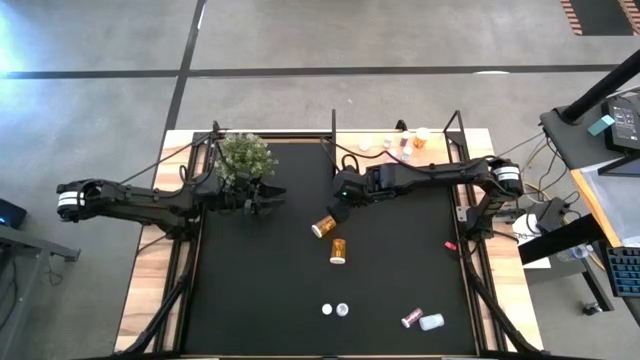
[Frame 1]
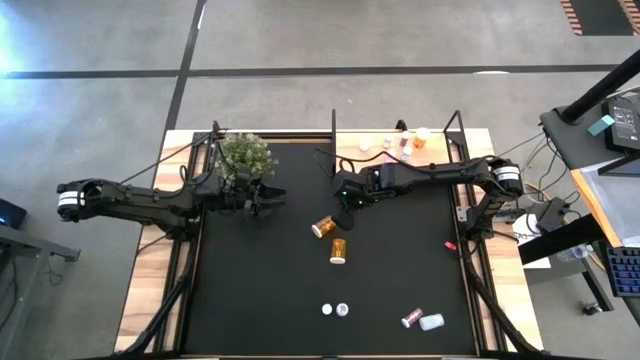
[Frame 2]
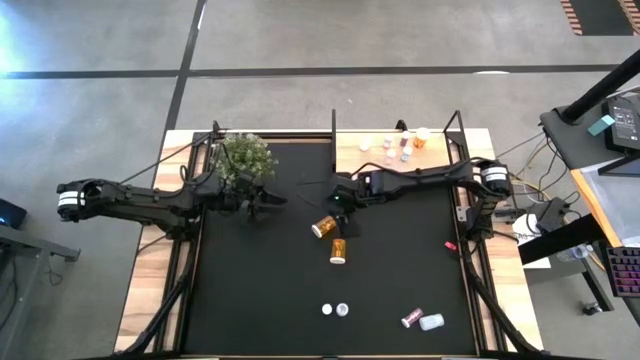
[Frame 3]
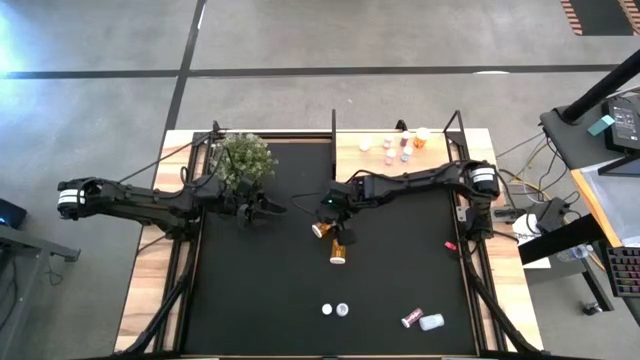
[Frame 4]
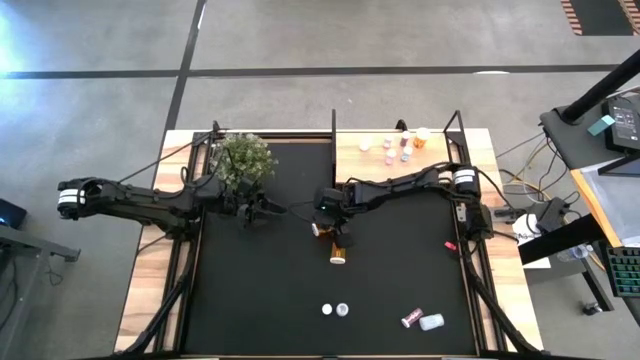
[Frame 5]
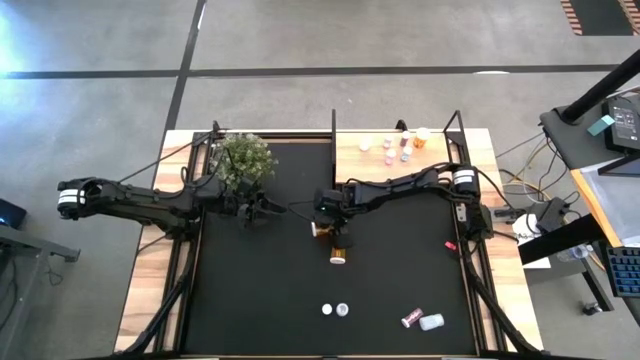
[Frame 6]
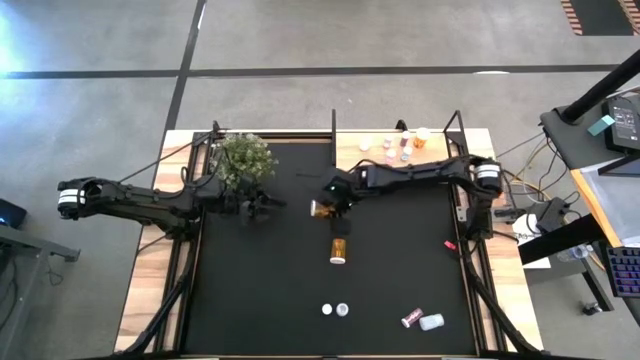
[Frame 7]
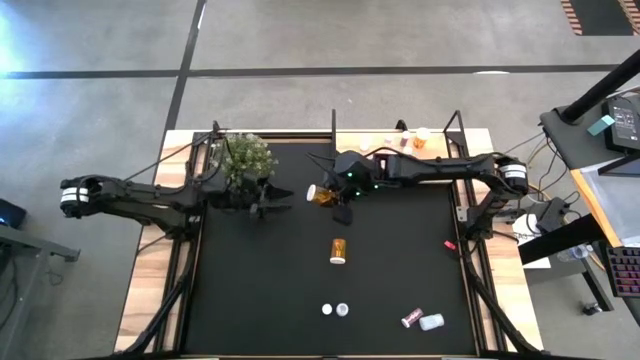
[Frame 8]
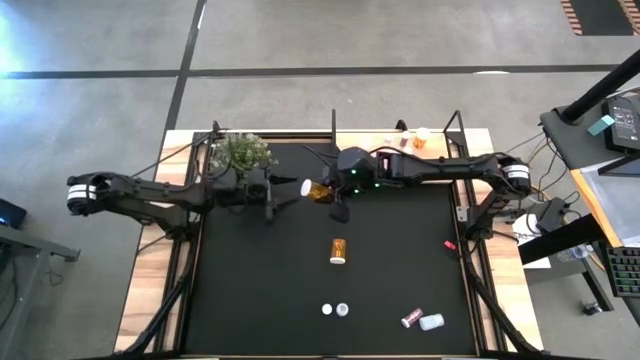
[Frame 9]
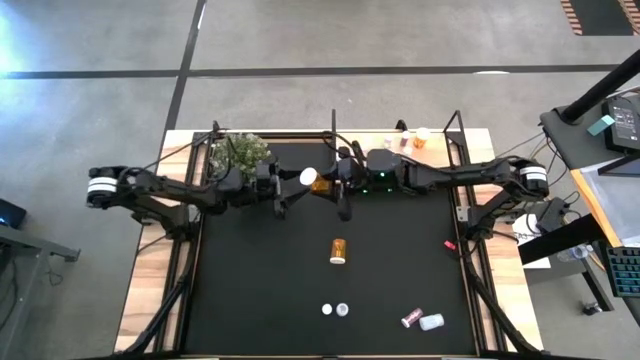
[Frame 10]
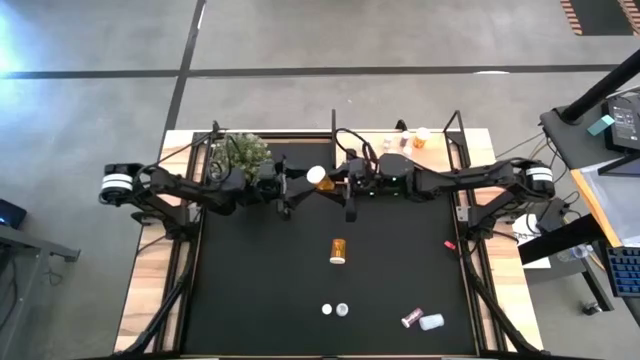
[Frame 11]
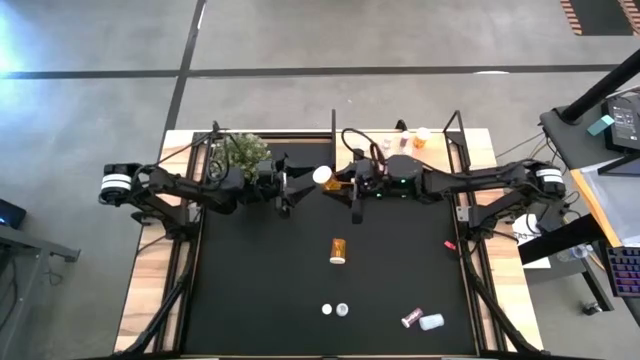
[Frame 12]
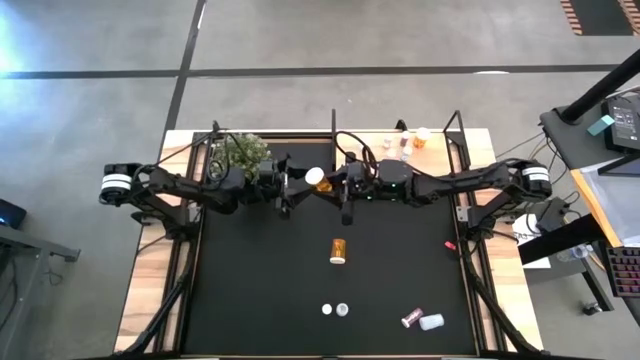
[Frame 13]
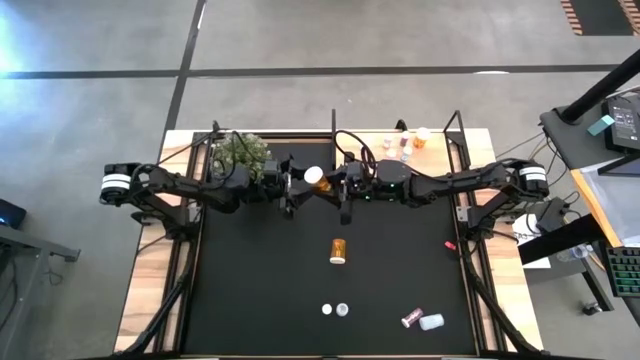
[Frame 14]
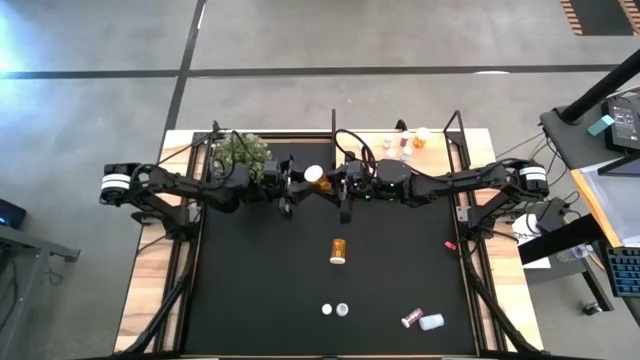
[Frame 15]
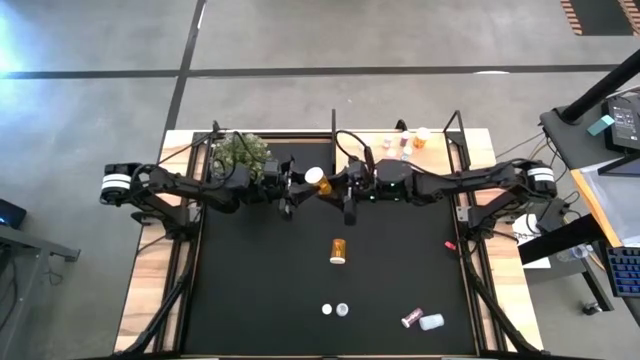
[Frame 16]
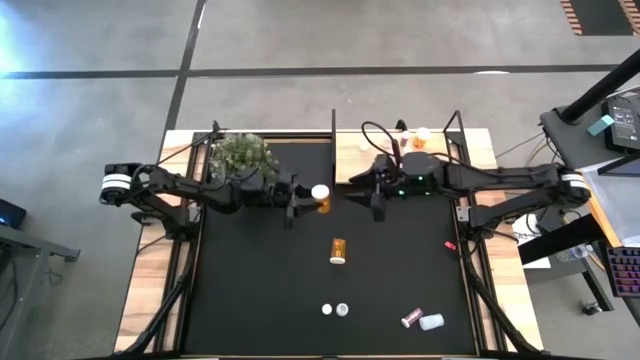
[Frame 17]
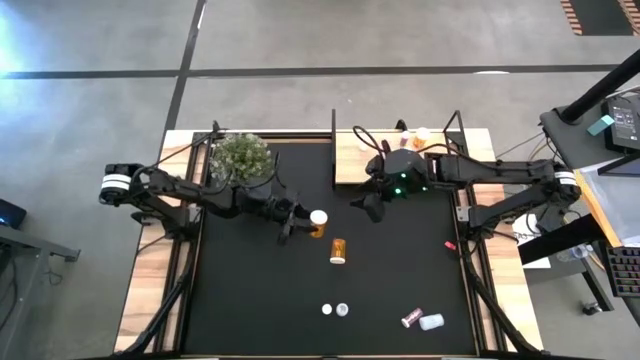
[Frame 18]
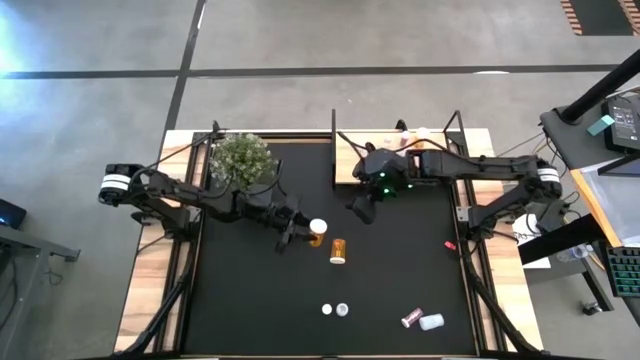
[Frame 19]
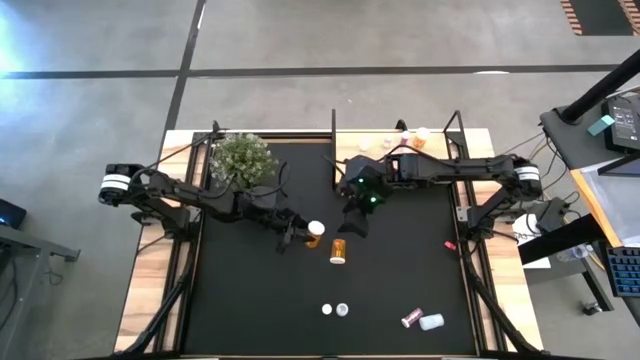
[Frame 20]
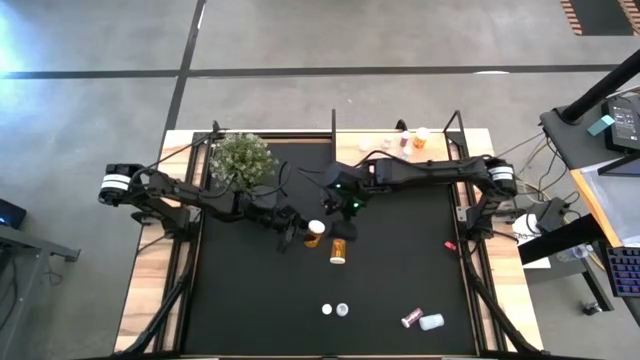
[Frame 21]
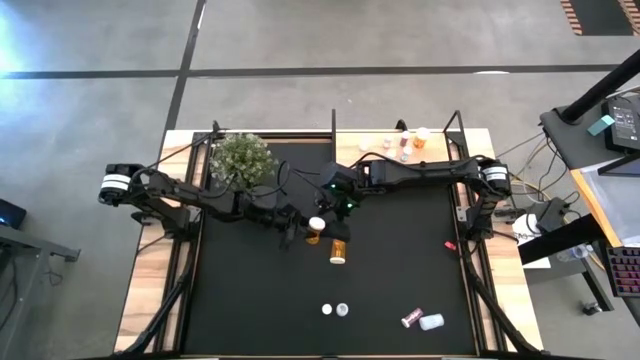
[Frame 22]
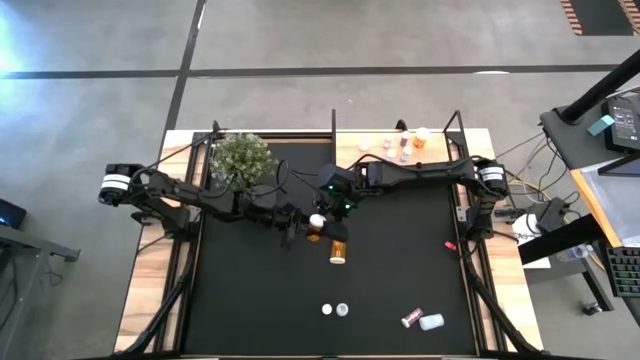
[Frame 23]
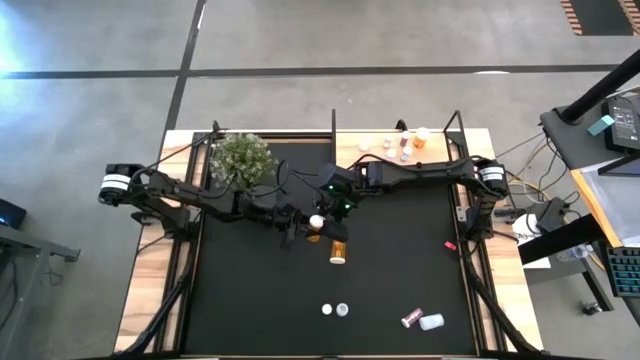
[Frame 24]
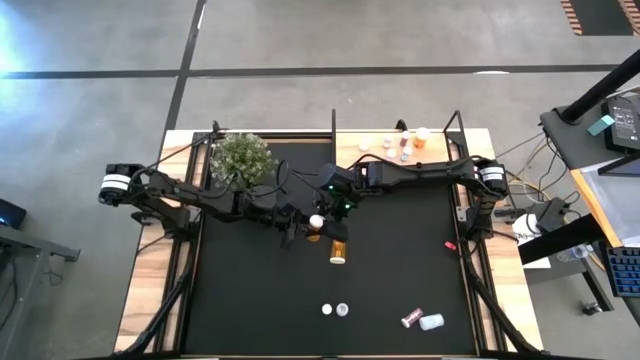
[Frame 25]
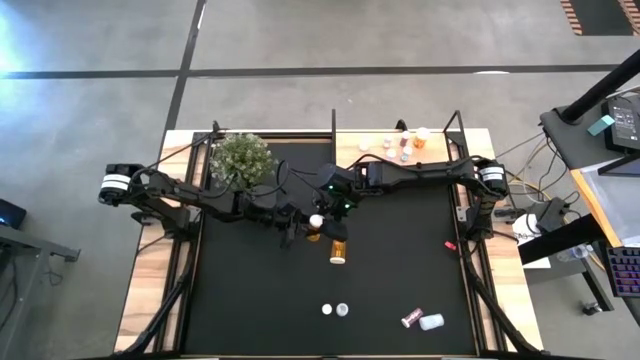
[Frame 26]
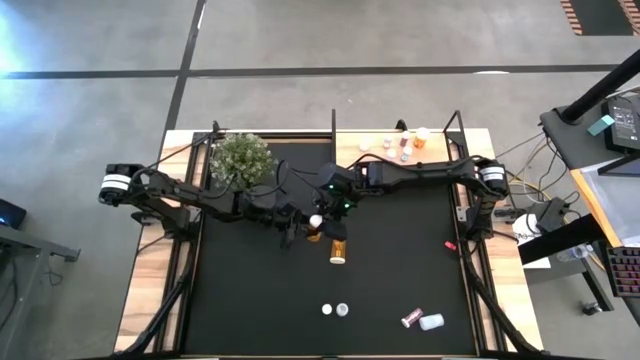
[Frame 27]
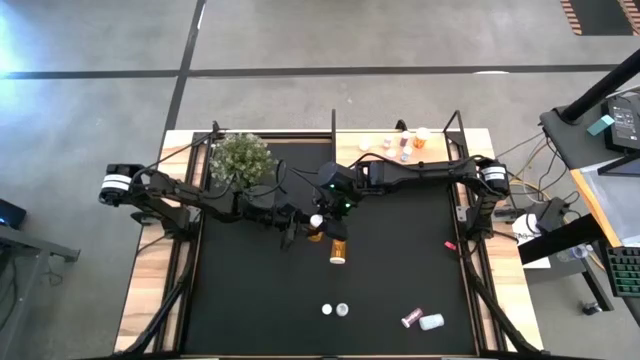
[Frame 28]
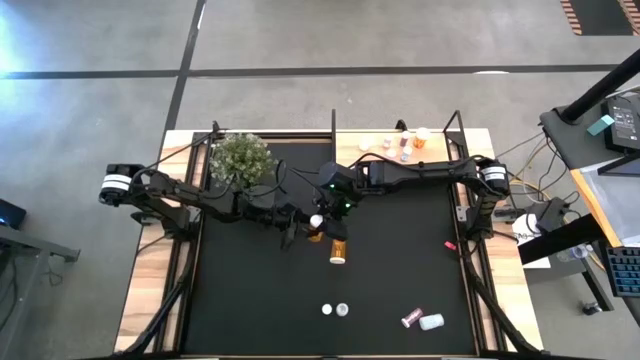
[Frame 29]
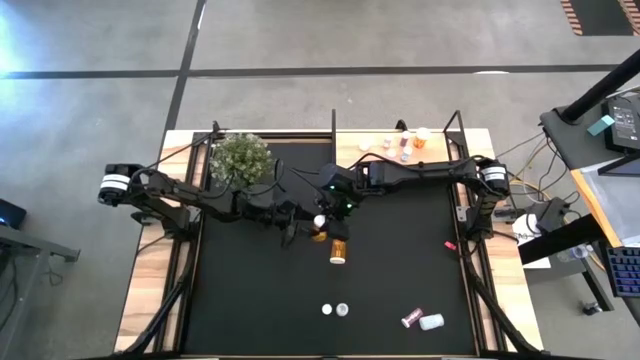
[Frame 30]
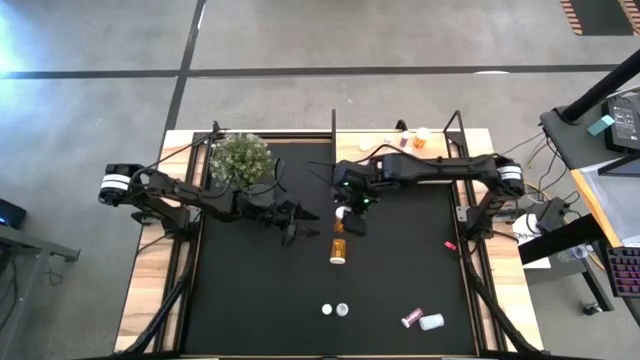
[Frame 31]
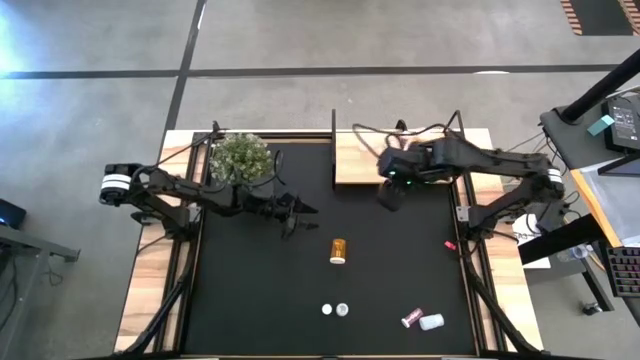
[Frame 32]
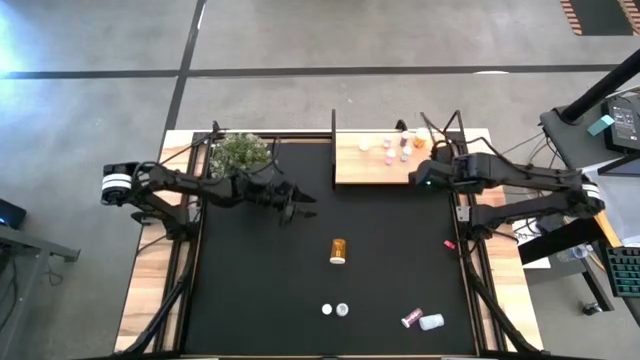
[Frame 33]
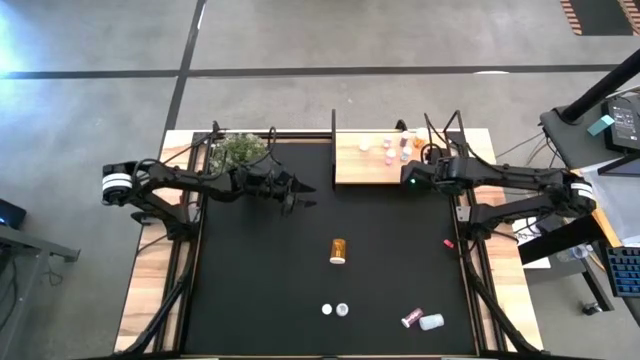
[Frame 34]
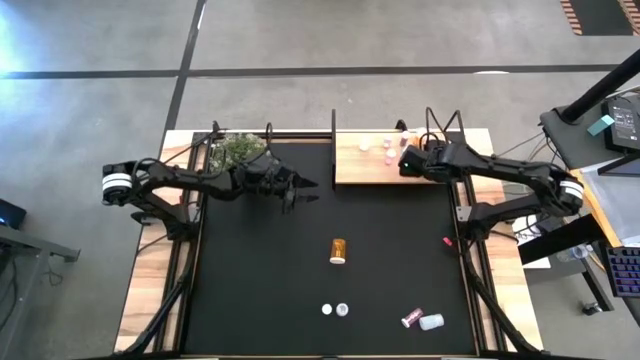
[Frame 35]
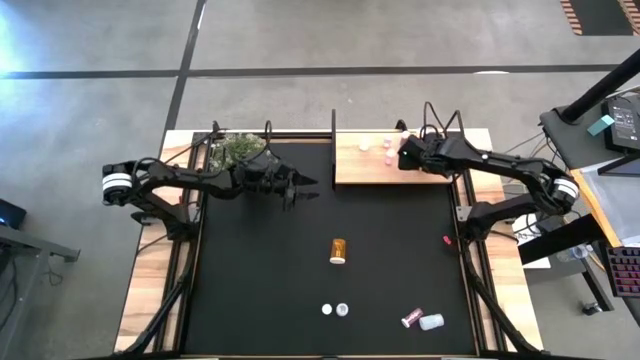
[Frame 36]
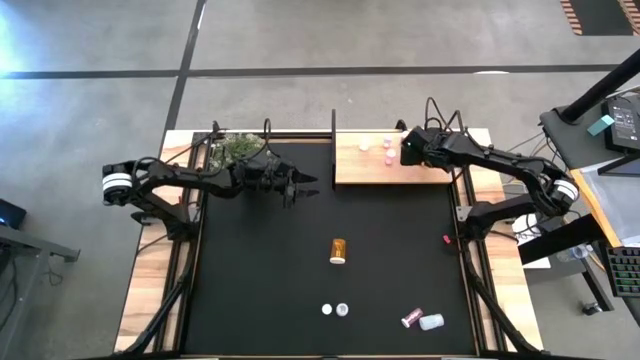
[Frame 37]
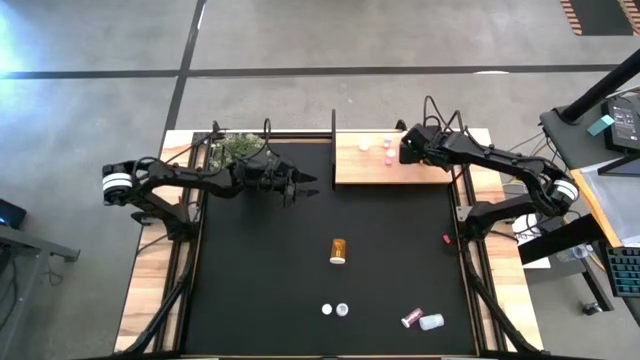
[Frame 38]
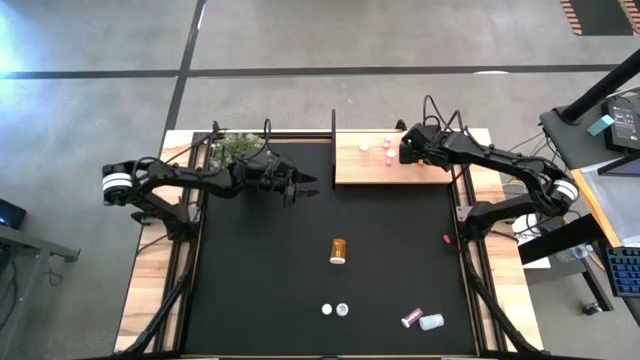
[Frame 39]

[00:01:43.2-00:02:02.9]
Task: Pick and place medicine bottles onto shelf by color
Put the top orange pill bottle on the shelf aligned with the other orange pill bottle
